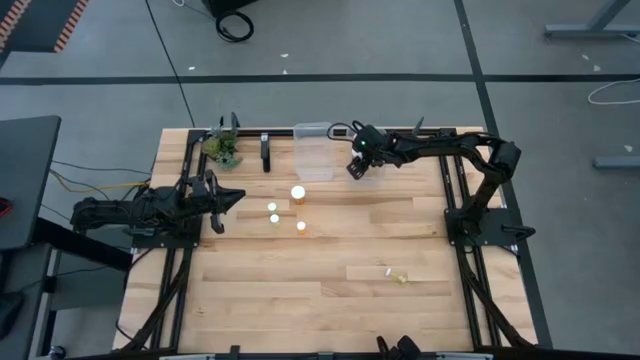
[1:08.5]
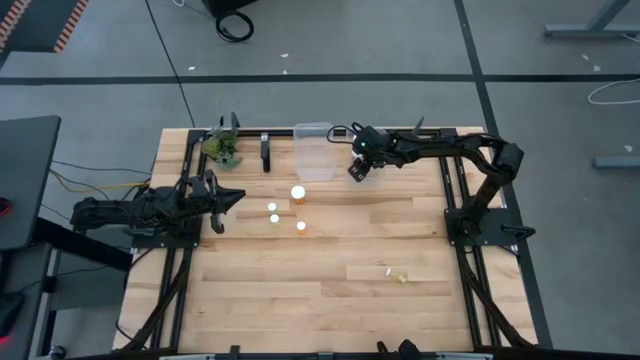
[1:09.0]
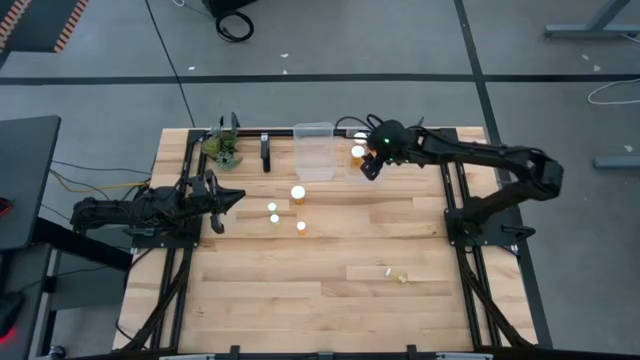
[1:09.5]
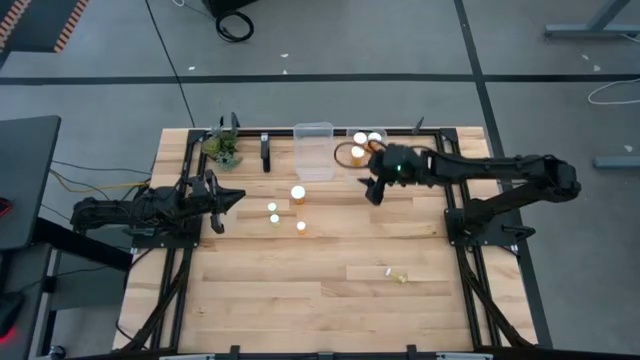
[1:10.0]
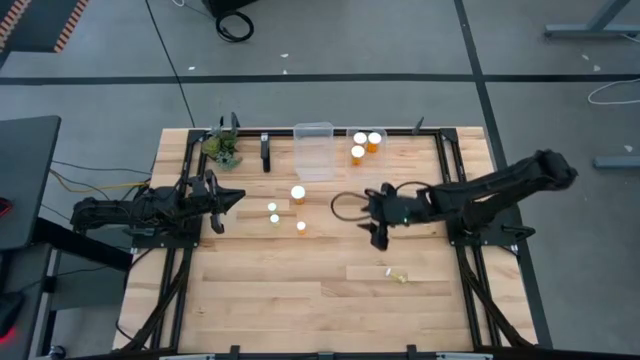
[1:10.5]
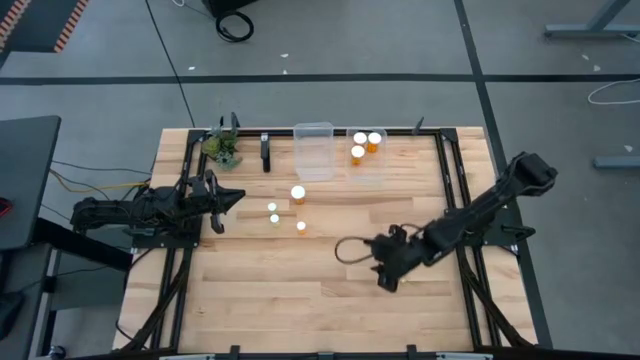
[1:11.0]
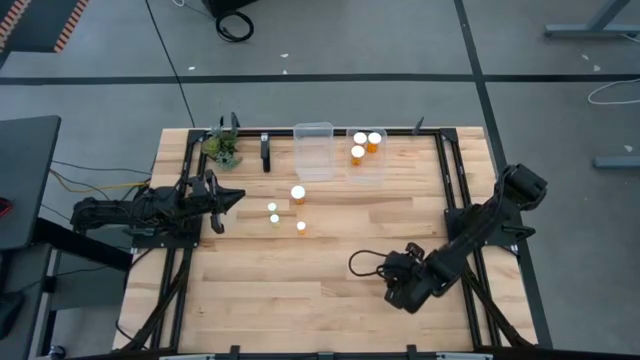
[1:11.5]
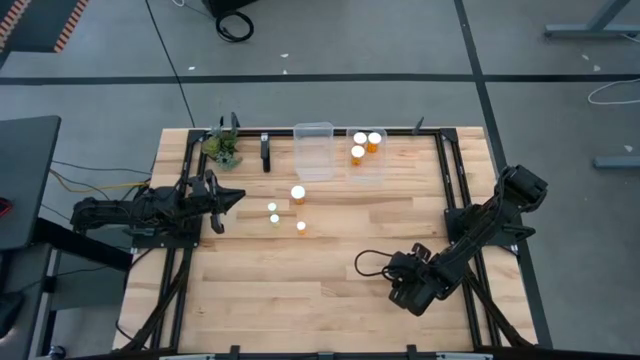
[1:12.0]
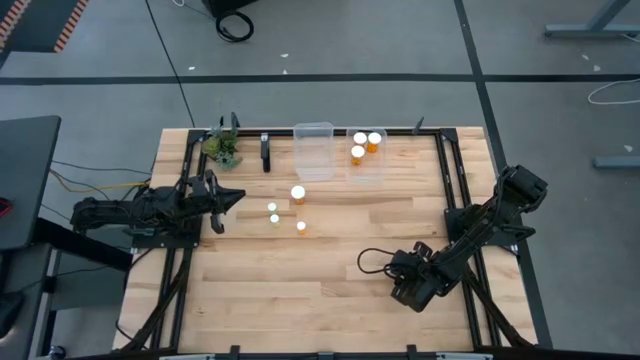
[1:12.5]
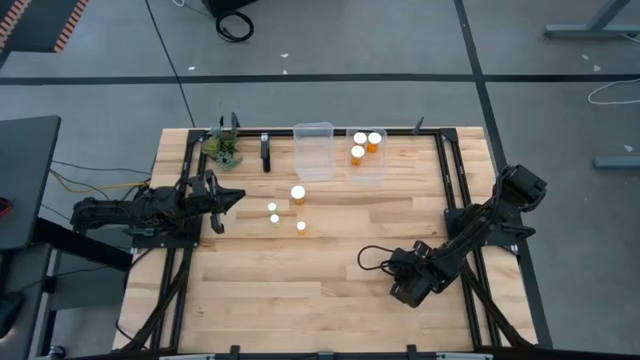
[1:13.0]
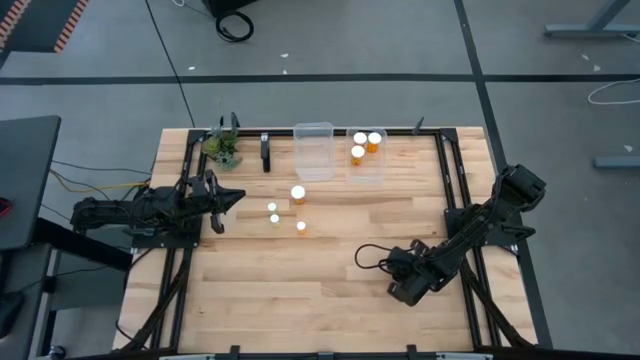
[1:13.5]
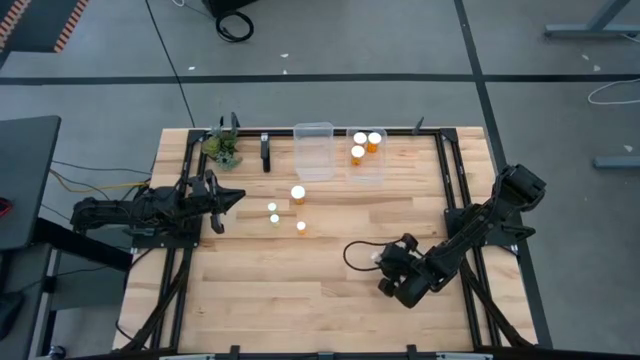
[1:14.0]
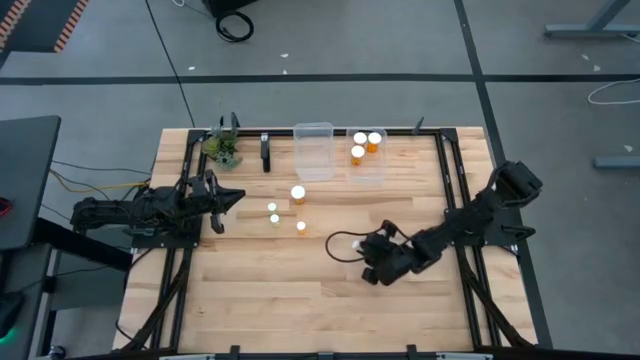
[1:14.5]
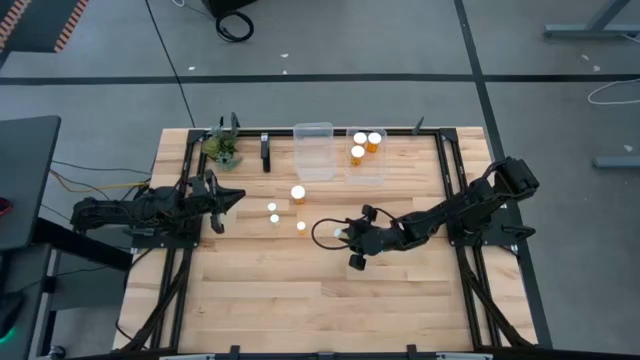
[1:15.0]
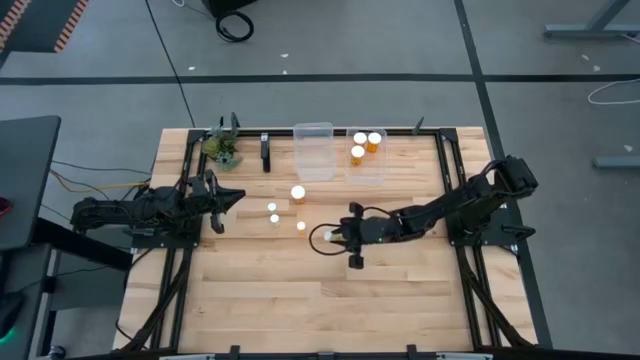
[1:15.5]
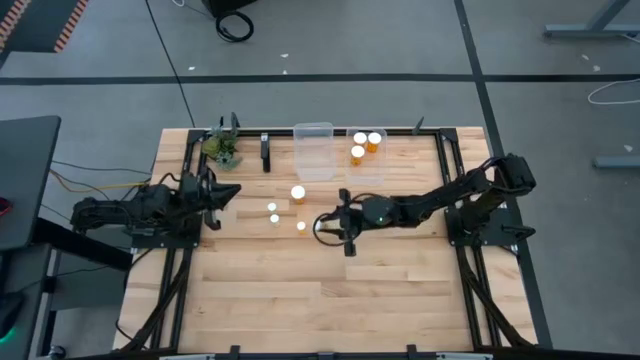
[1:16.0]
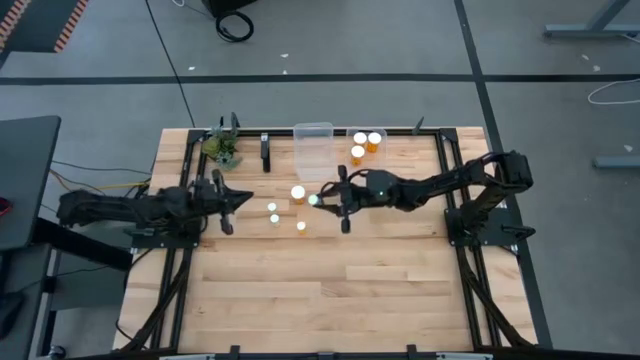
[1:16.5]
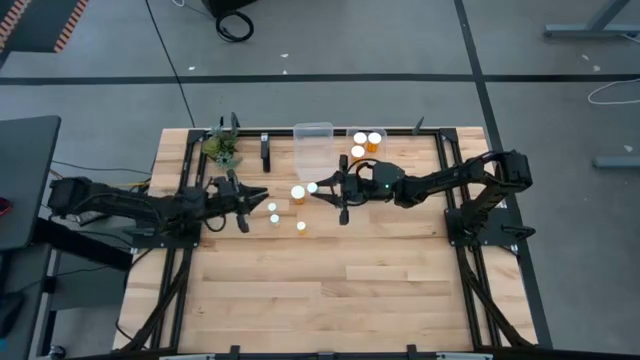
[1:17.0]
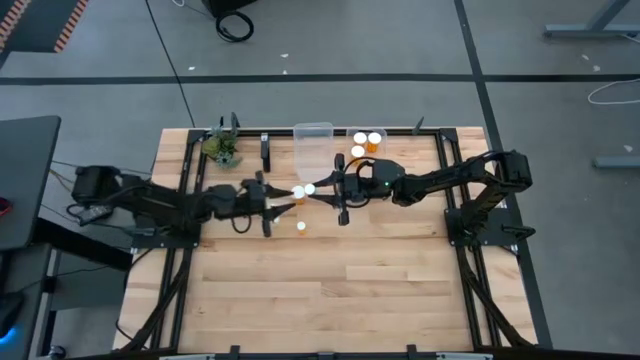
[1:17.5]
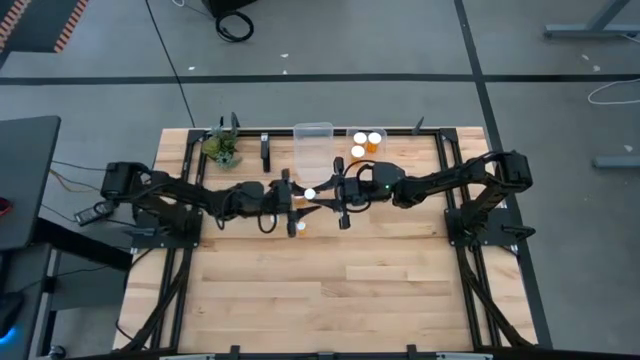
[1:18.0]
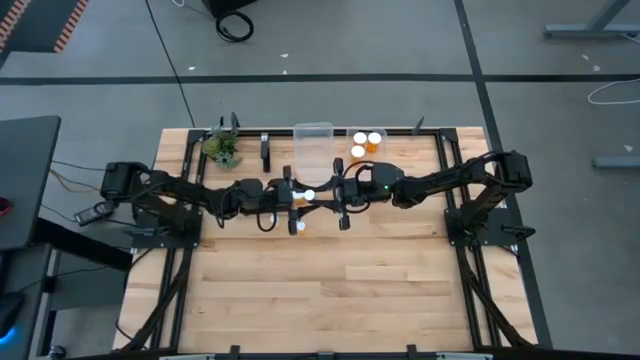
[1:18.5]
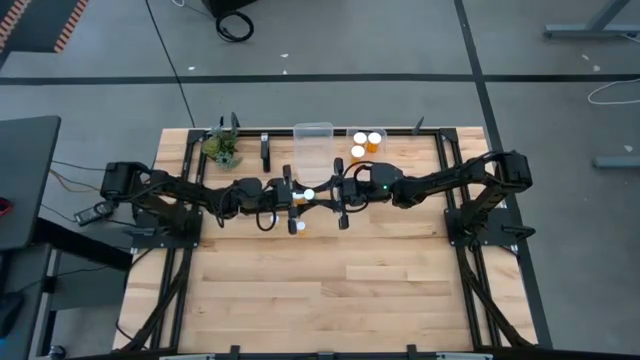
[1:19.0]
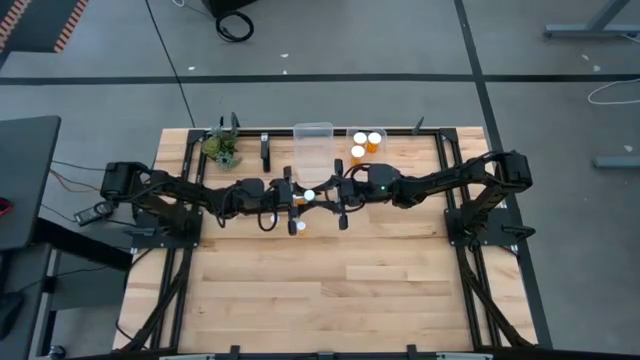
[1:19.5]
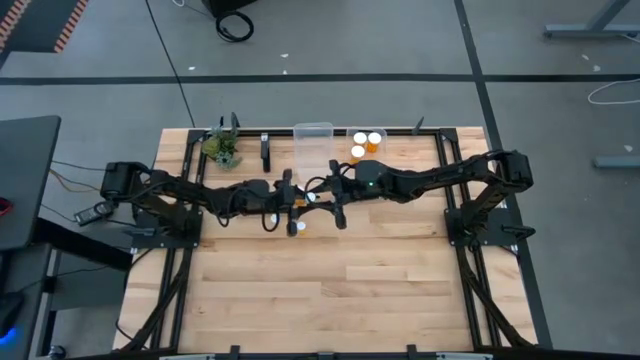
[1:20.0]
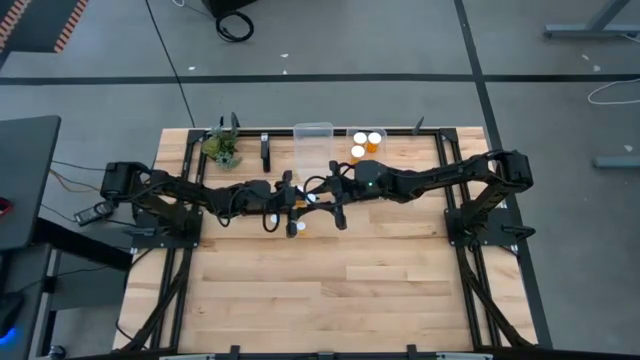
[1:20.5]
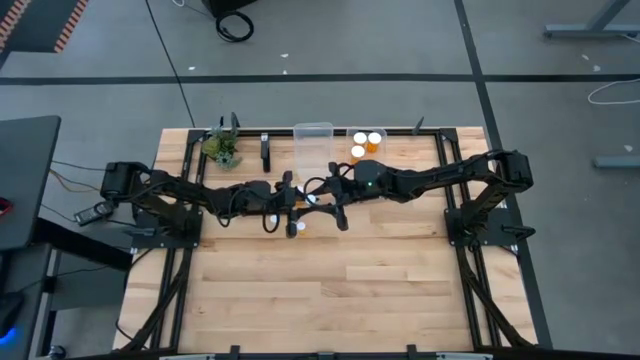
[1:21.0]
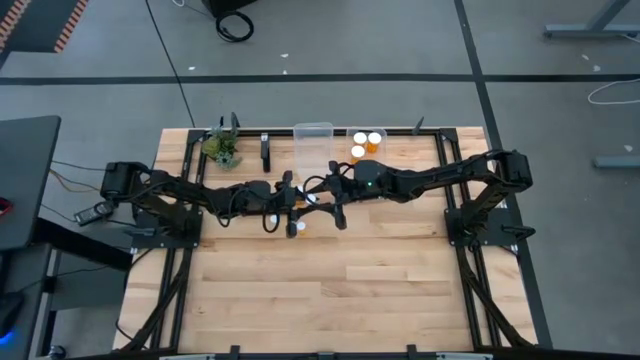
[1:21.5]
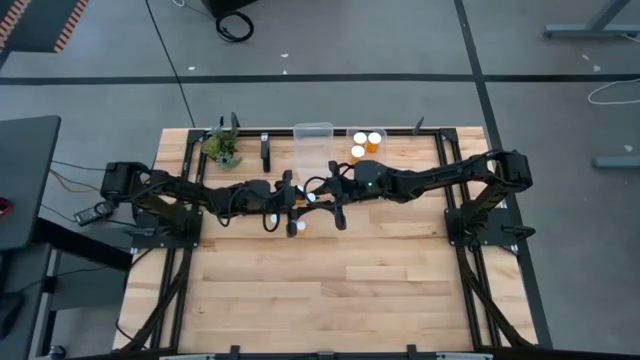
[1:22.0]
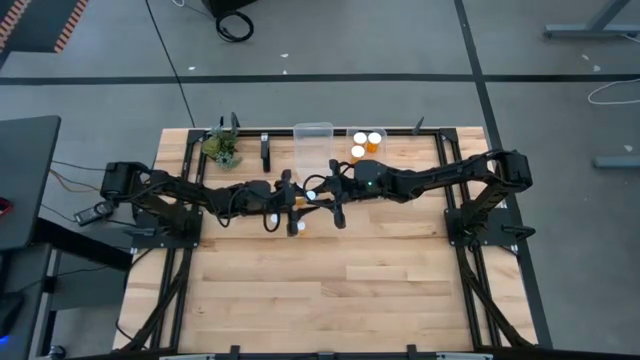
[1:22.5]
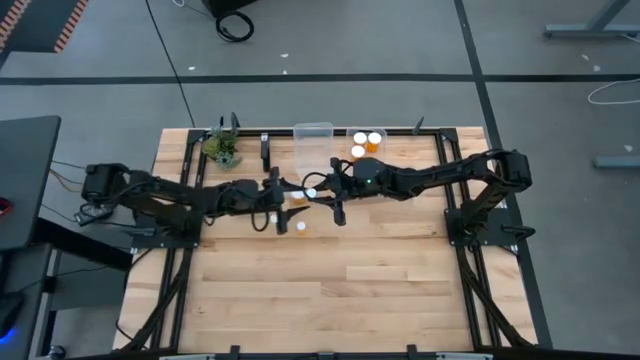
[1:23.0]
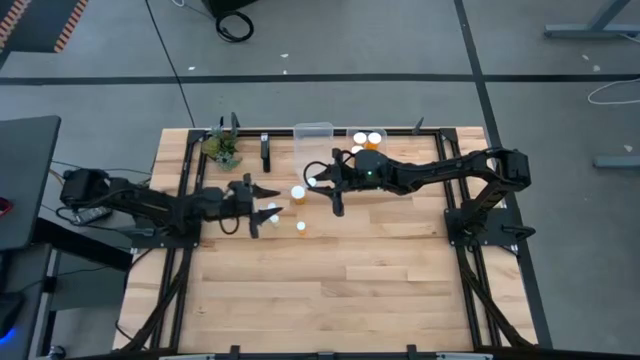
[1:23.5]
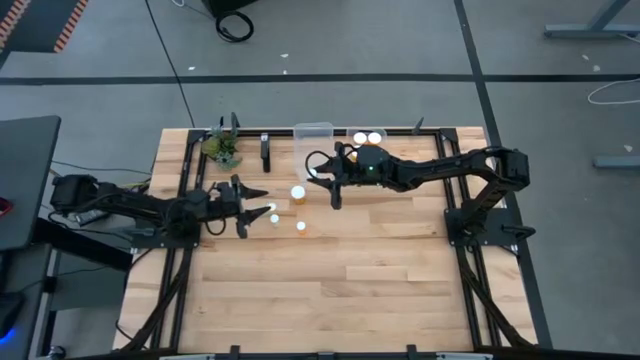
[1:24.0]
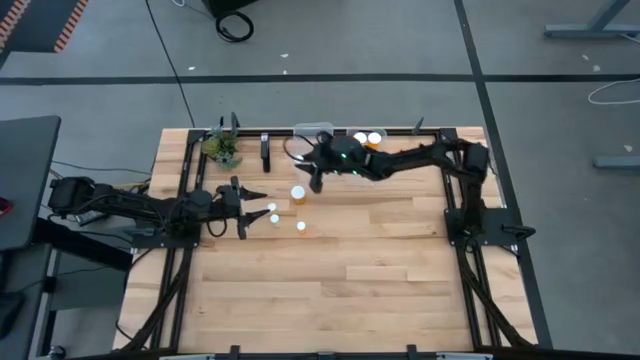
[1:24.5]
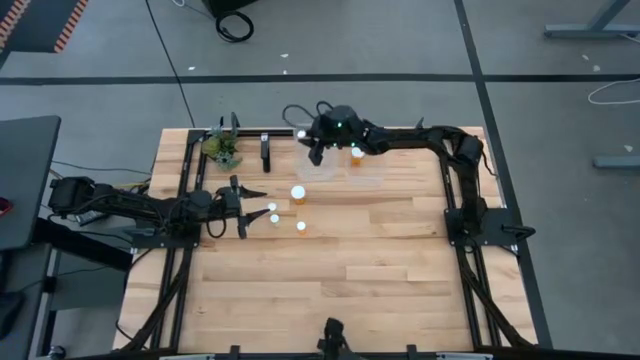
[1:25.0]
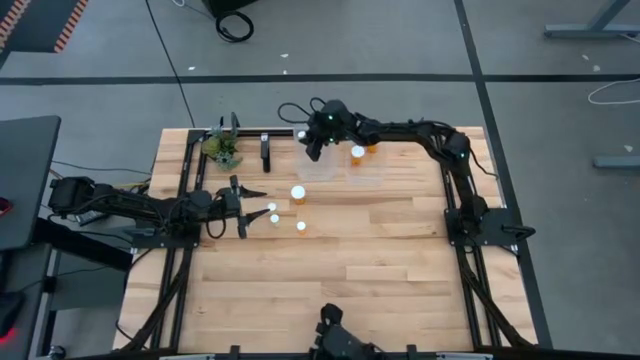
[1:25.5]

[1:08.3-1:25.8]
Task: Pick and place medicine bottles into bin by pill shape (circle, oval)
Put the bottom right small yellow pill into the left transparent bin

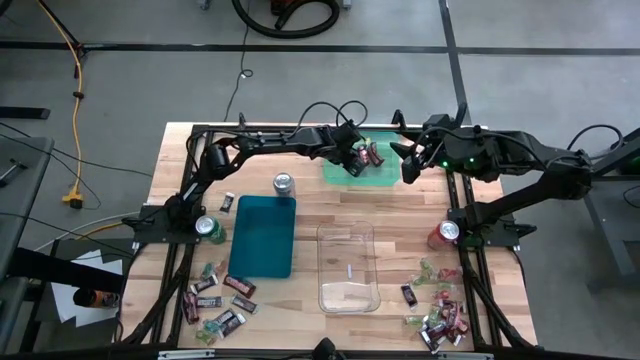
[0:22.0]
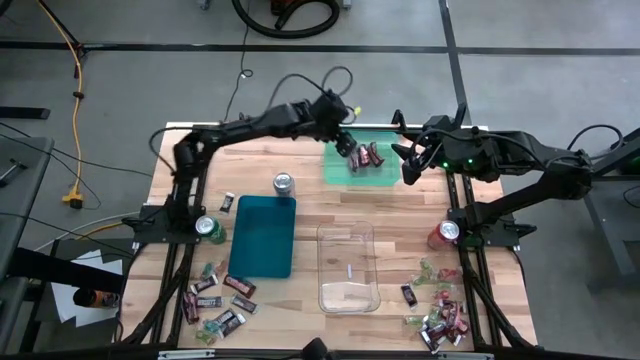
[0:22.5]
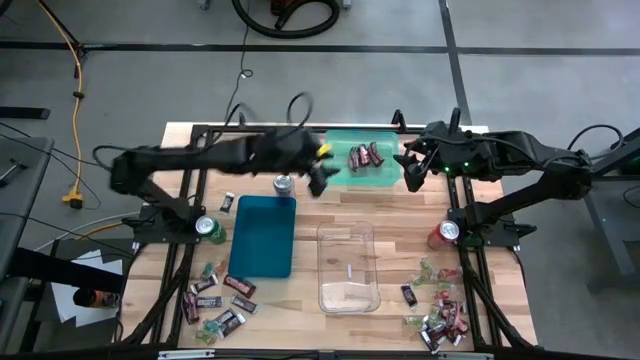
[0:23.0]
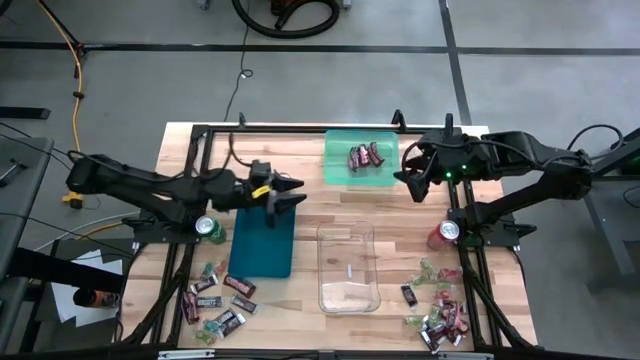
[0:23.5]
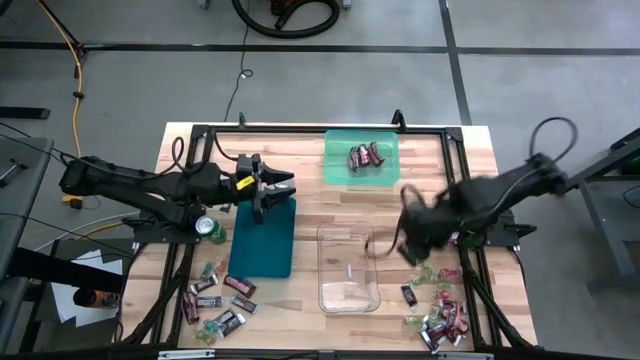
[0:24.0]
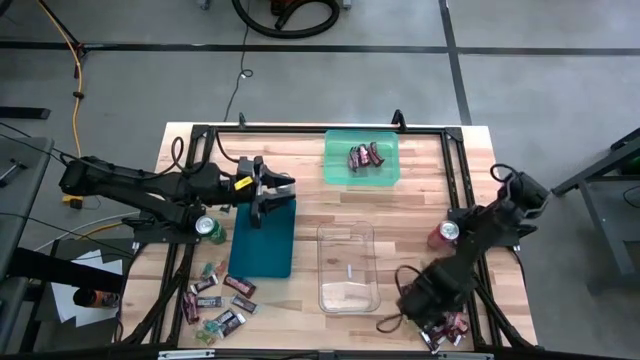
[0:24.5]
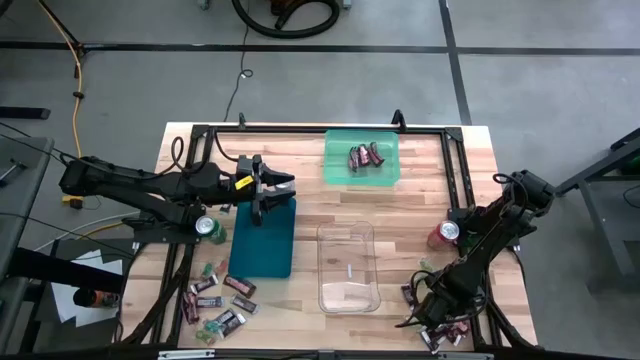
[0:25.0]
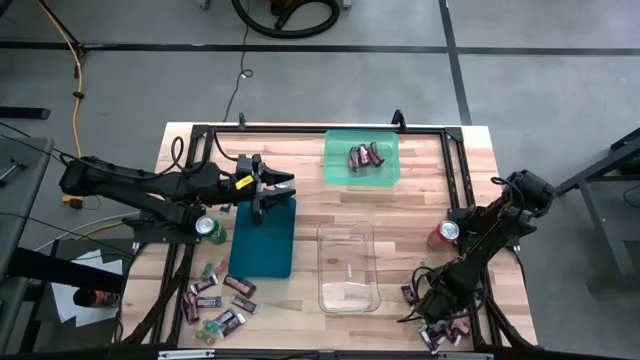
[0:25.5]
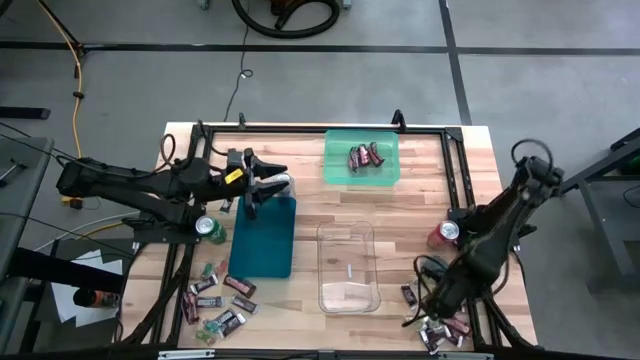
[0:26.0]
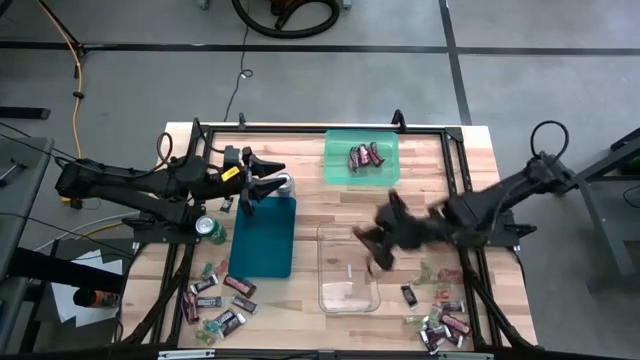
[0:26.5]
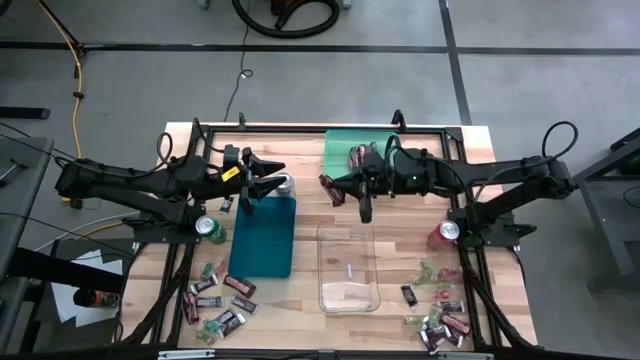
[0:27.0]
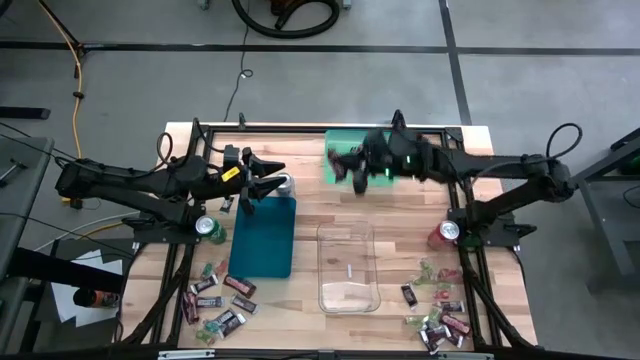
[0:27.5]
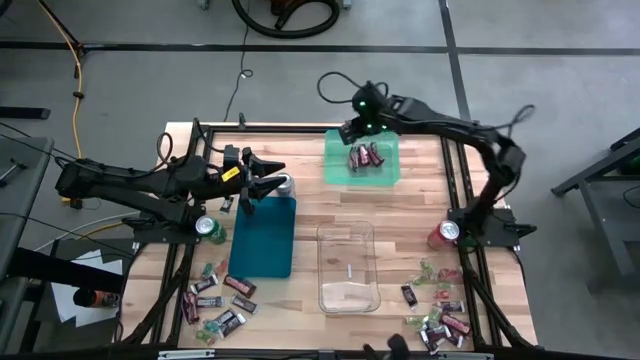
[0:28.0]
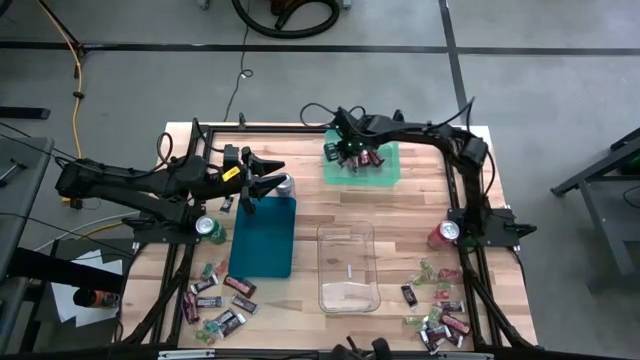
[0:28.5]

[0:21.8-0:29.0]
Task: Sort candy
Put the chocolate peanut bar into the green bin
